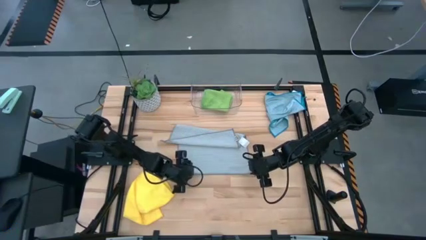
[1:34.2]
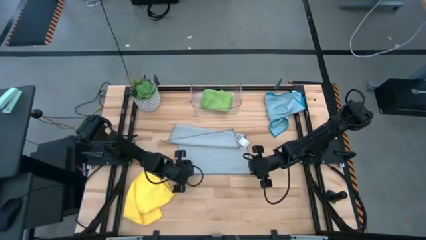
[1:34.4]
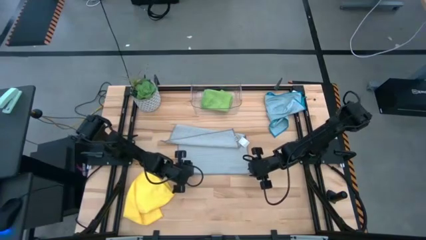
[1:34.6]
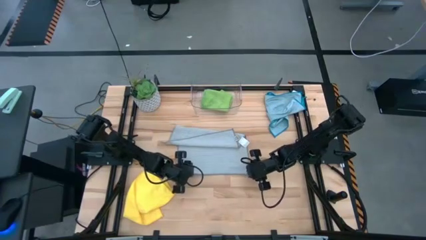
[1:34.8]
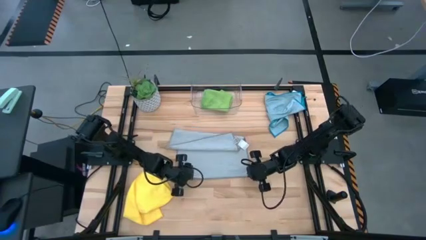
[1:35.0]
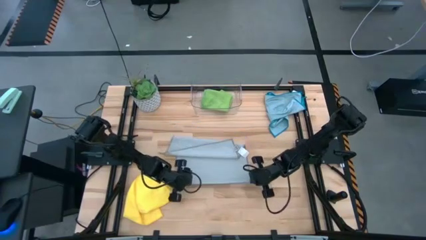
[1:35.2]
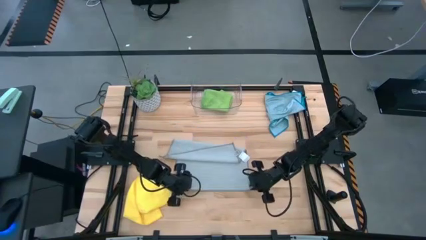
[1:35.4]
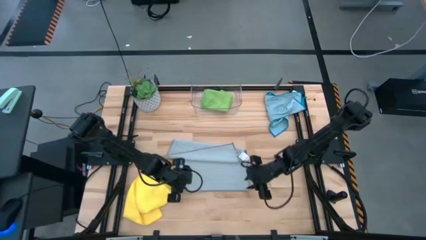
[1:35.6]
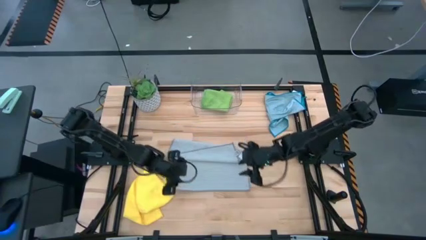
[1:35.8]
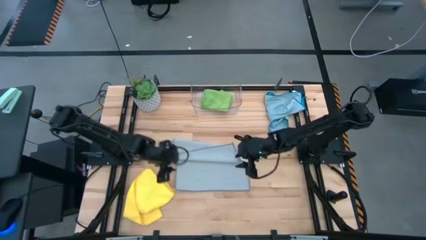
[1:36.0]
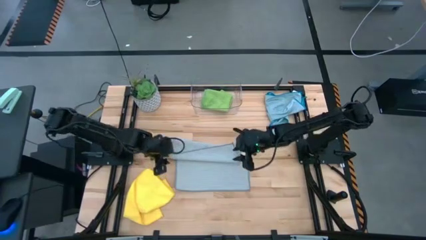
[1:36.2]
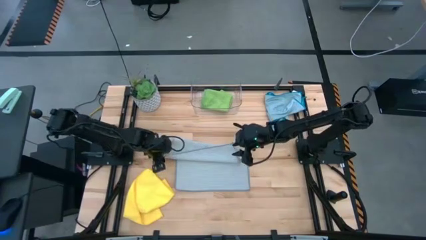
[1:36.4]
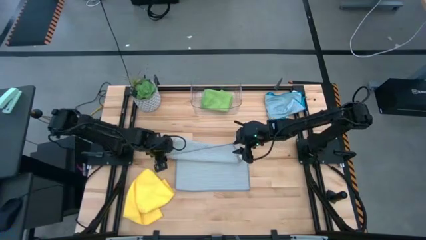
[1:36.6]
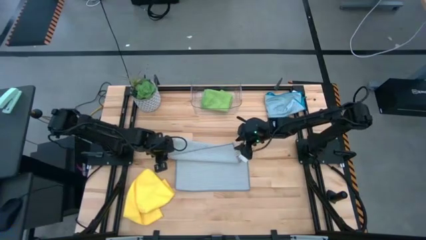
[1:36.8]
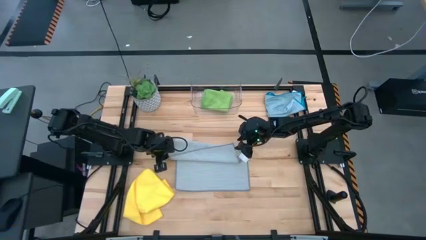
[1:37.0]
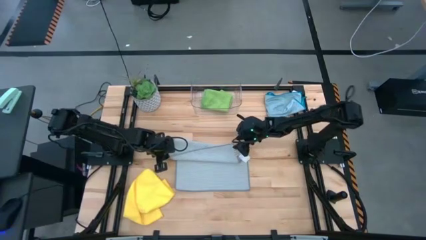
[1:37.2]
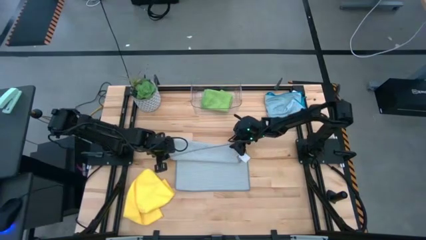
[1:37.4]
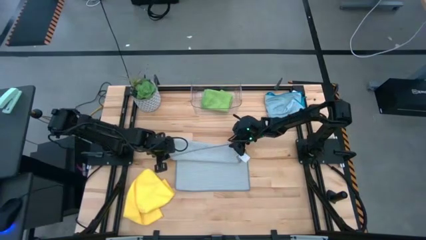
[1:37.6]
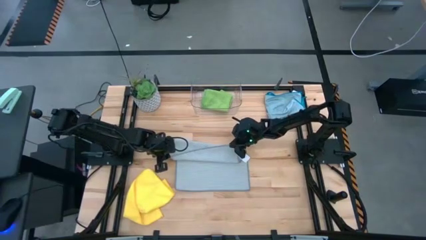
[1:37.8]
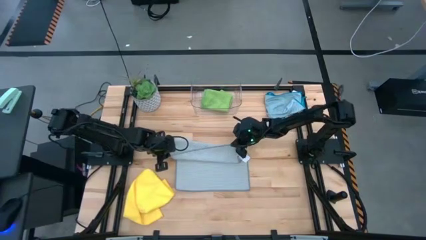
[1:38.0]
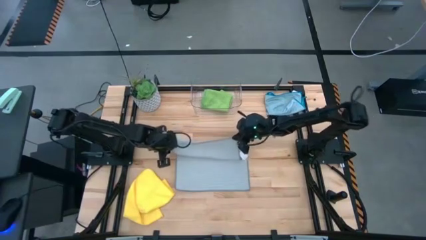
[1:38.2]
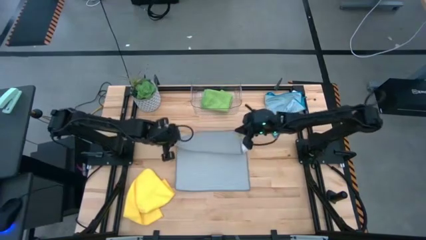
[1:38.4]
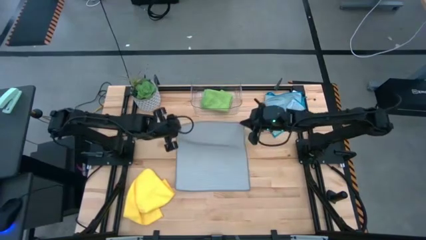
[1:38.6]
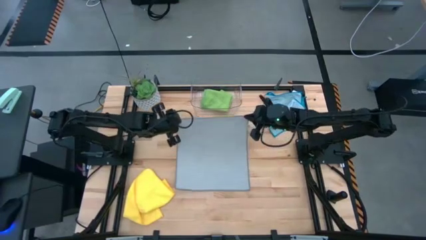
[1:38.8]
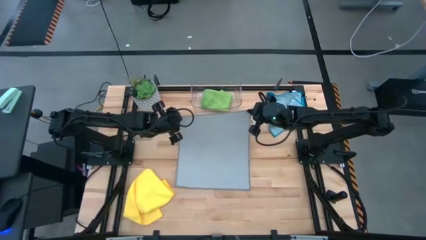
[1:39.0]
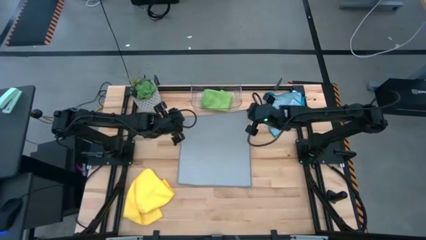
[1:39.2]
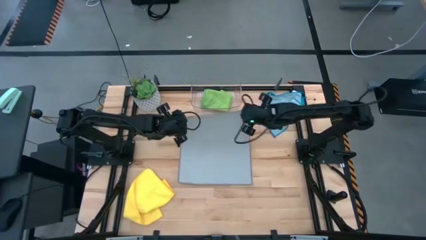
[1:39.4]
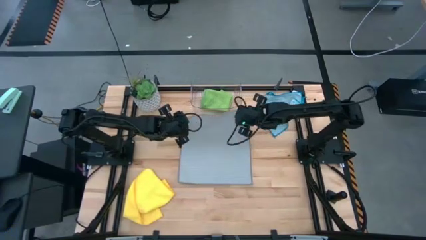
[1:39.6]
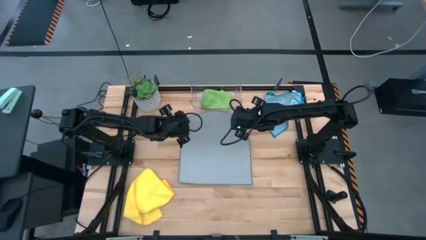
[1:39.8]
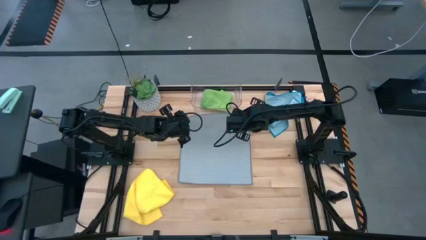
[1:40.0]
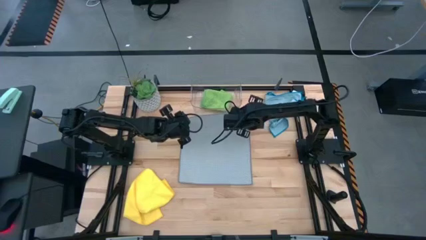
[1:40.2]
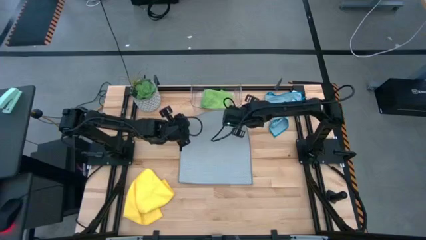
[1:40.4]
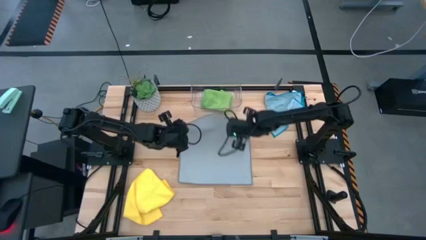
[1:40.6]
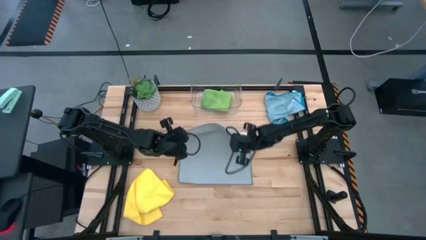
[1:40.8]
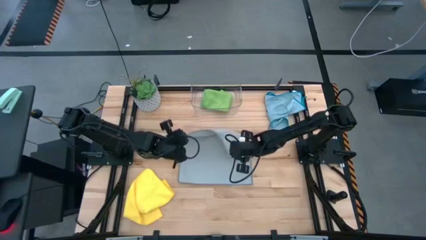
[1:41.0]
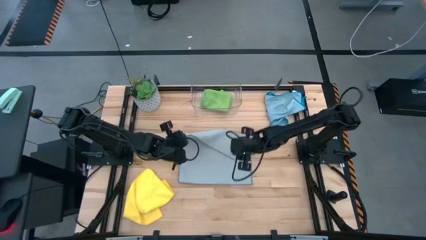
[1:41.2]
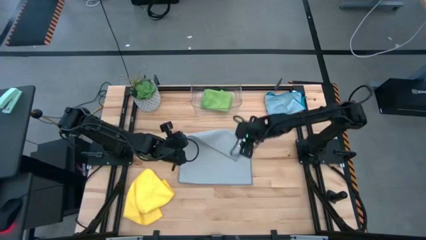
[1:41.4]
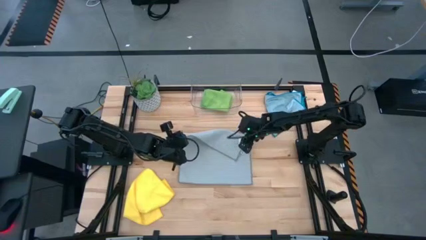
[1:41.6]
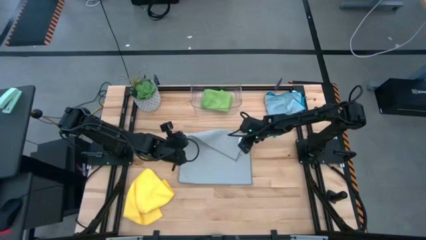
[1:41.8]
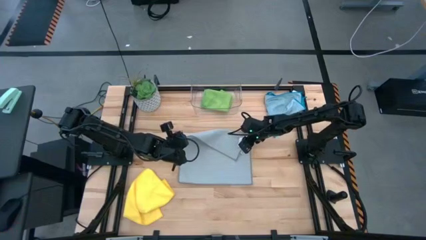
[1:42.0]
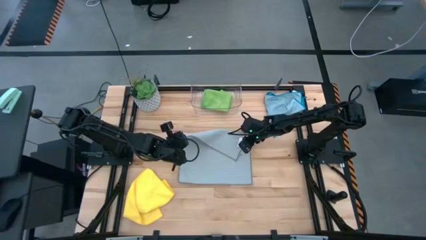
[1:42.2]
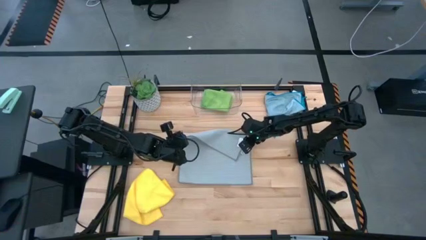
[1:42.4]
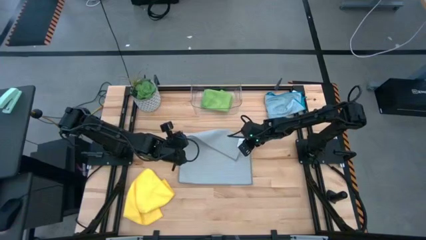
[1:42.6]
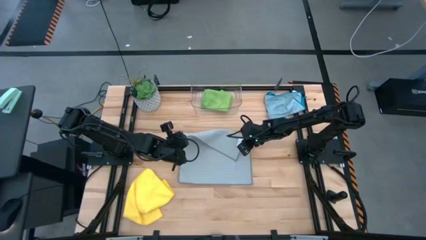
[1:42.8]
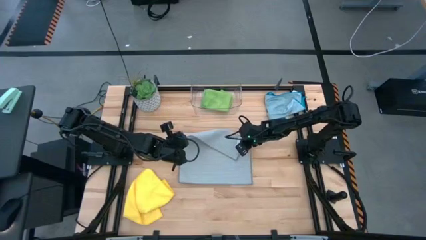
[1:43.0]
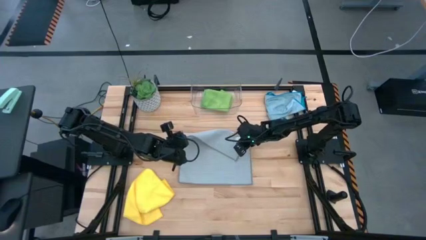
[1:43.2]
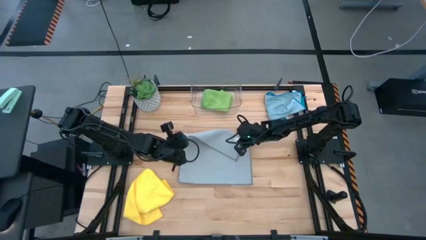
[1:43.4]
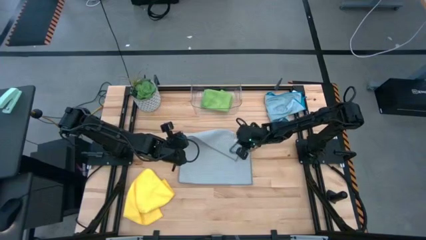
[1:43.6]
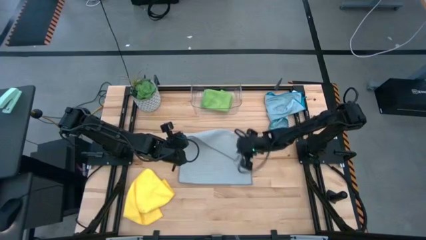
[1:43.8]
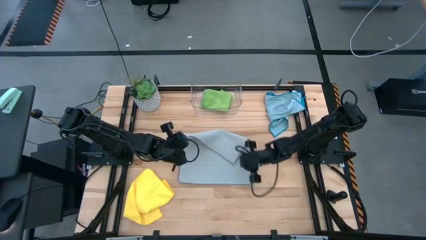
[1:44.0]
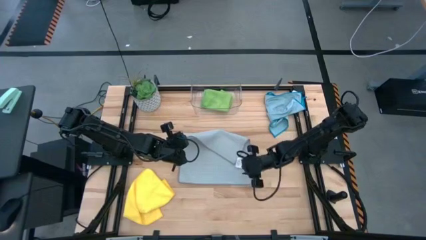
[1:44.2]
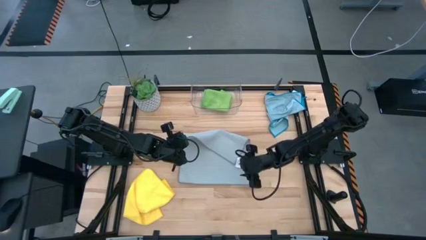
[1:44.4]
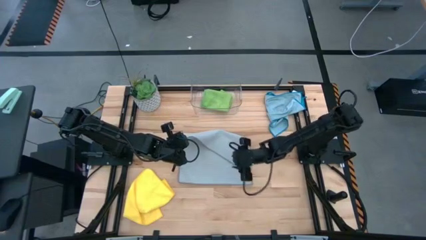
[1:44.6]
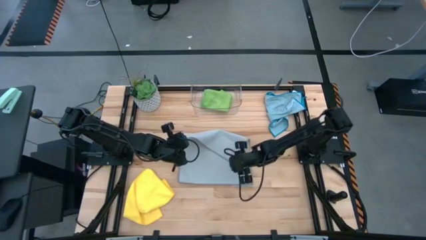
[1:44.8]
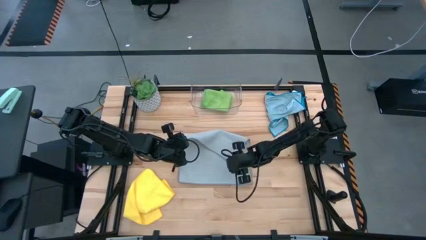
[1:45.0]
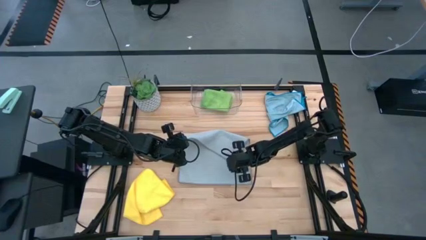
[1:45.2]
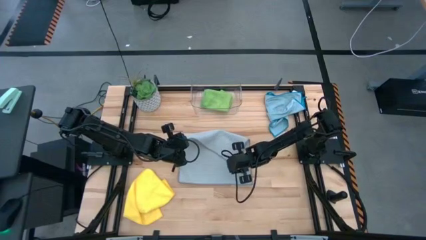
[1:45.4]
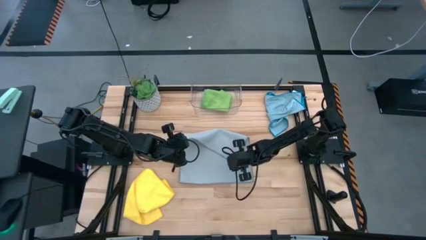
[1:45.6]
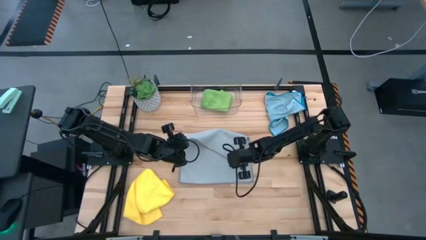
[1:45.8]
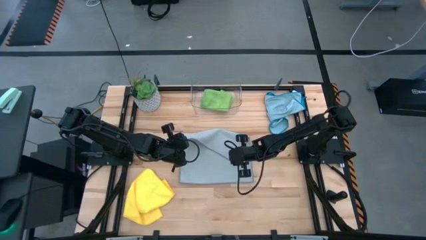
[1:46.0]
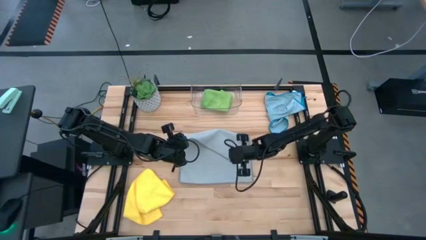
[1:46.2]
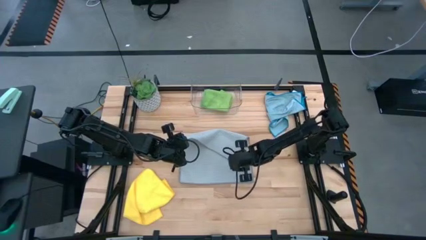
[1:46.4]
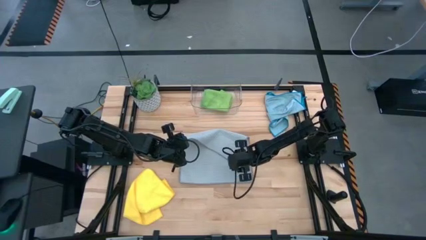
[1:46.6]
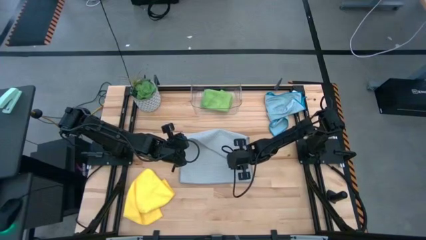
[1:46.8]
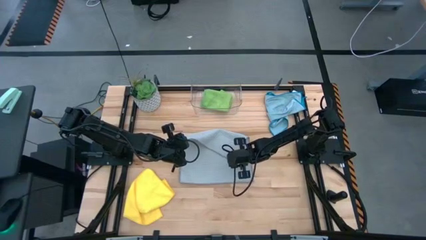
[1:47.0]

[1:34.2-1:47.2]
Task: Fold microfiber towels
Fold the gray microfiber cloth

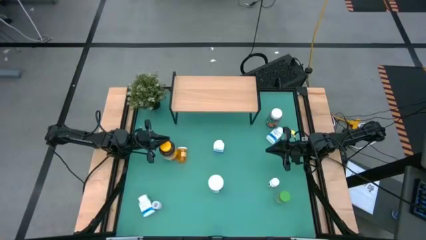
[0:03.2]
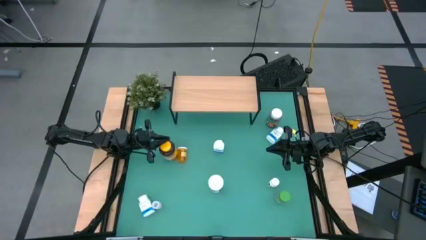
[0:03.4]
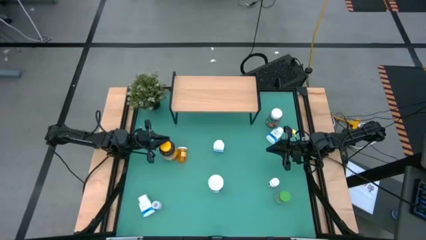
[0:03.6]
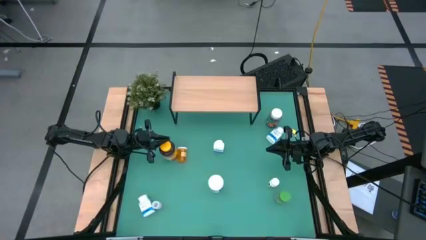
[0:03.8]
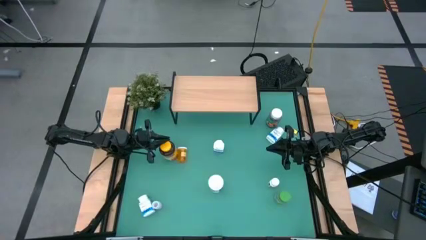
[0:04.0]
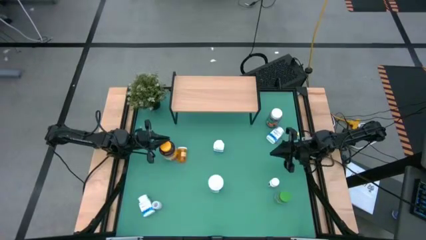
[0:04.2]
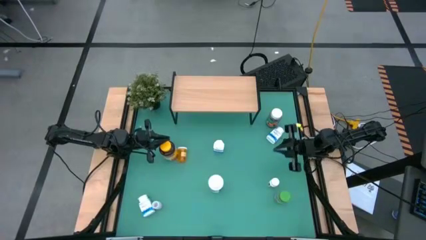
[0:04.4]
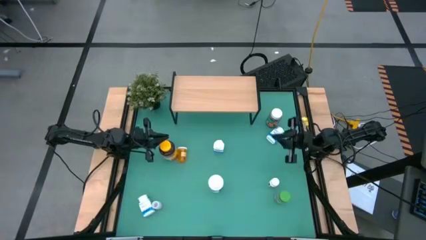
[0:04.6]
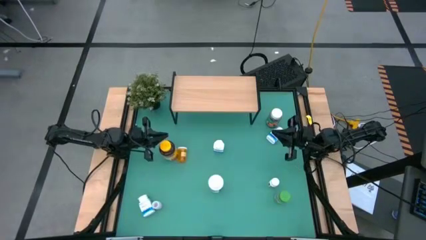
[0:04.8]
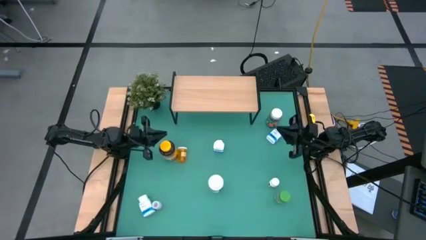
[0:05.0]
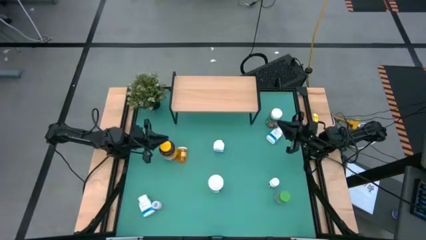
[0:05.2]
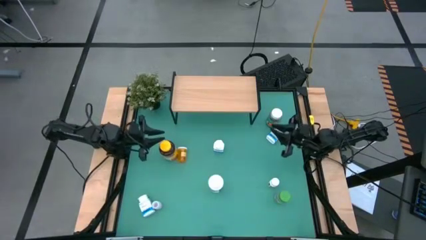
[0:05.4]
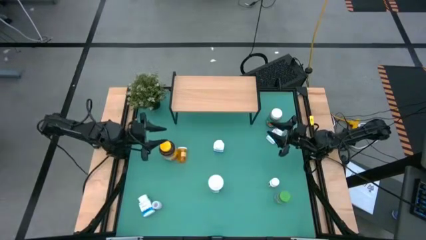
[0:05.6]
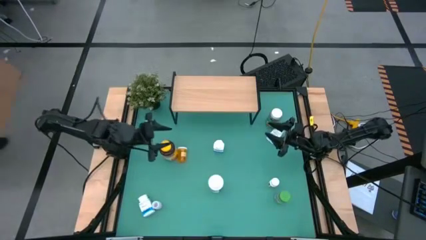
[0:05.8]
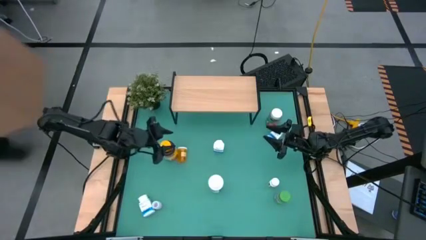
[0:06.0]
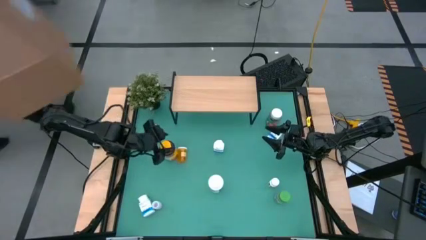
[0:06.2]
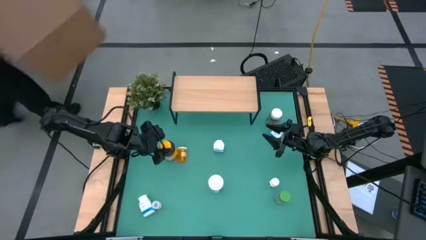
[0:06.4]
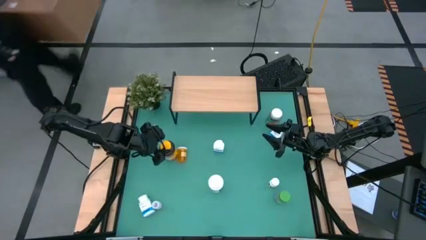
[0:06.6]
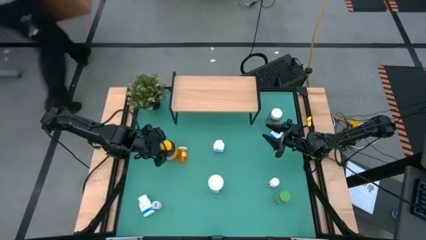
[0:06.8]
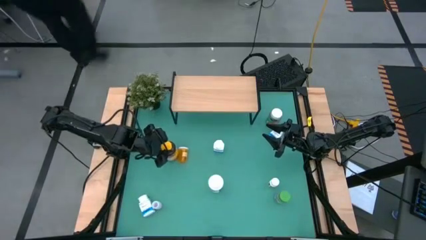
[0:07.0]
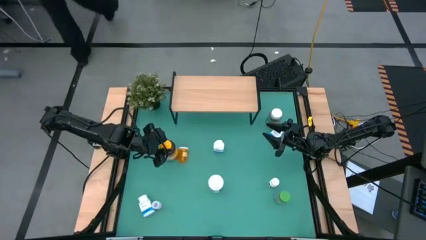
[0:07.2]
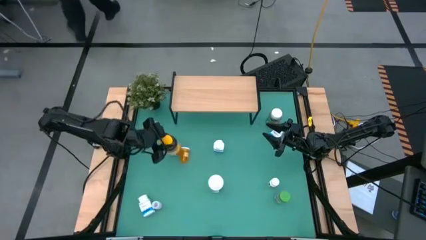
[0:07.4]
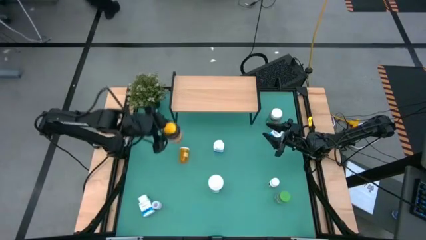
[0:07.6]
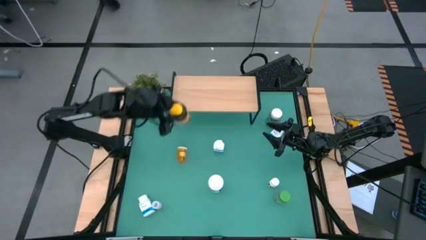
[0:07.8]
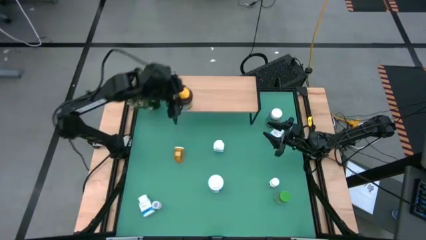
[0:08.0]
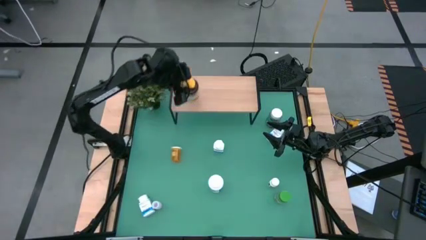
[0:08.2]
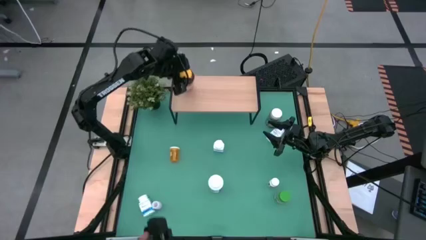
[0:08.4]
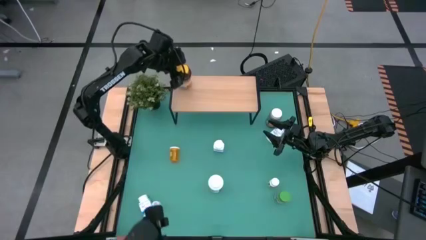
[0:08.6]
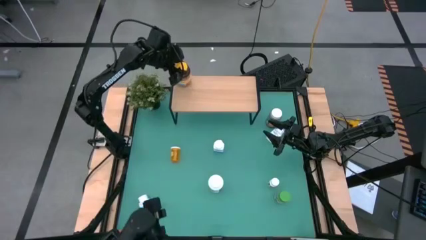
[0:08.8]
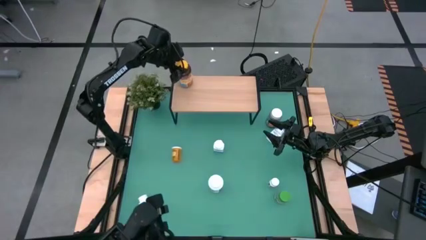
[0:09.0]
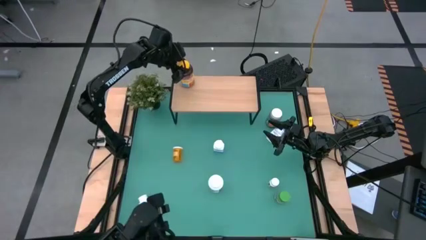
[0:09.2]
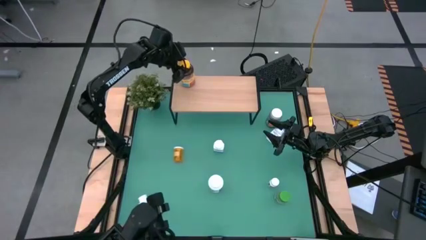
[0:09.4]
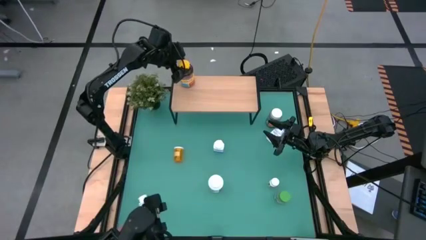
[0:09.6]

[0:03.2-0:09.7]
Task: Pick and place medicine bottles onto shelf by color
Put the yellow pill bottle on the shelf
